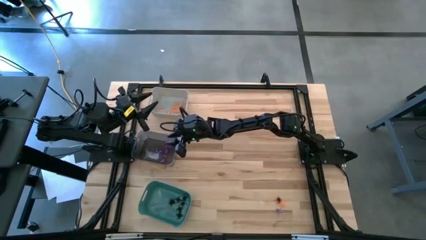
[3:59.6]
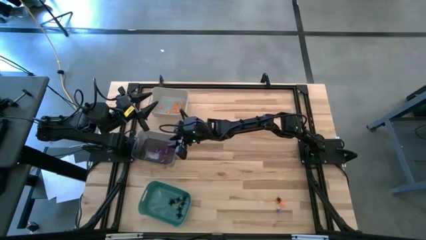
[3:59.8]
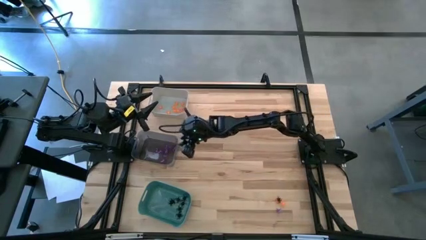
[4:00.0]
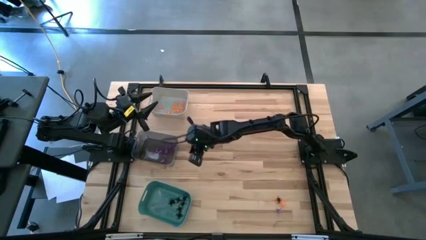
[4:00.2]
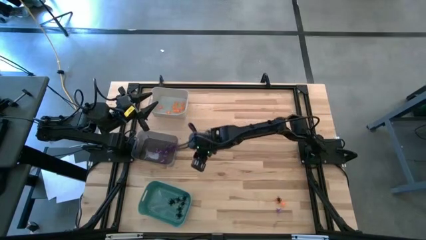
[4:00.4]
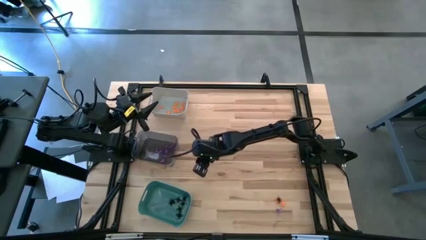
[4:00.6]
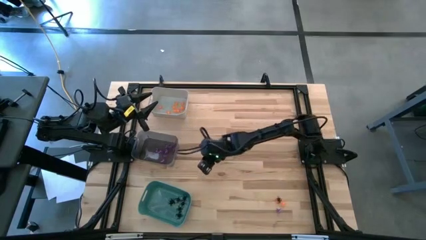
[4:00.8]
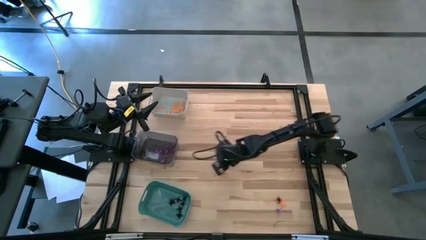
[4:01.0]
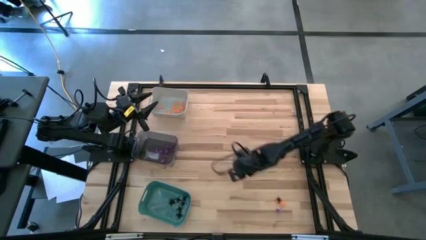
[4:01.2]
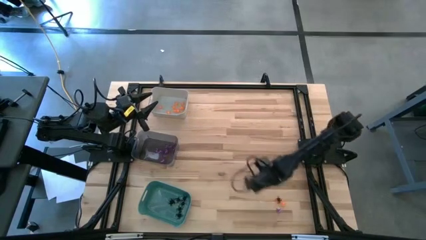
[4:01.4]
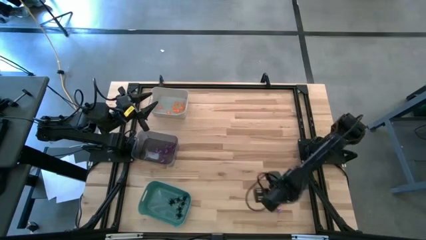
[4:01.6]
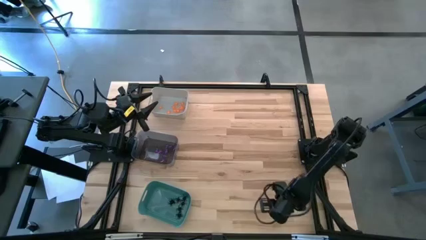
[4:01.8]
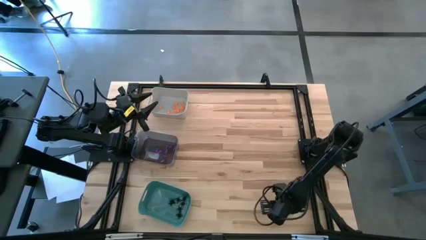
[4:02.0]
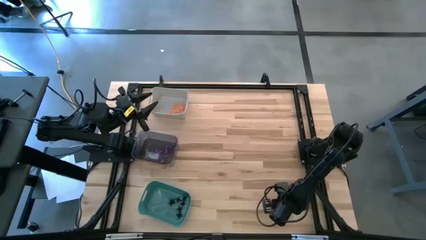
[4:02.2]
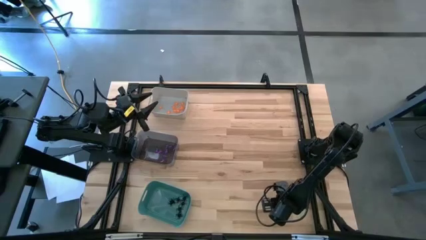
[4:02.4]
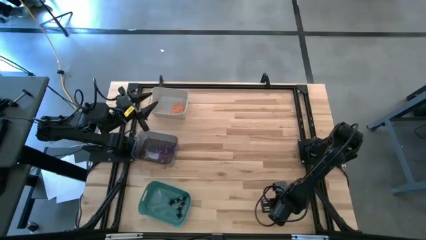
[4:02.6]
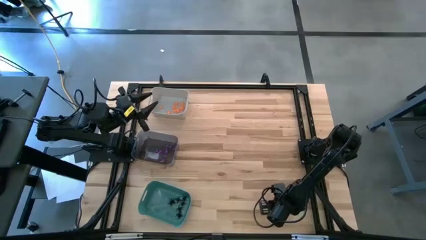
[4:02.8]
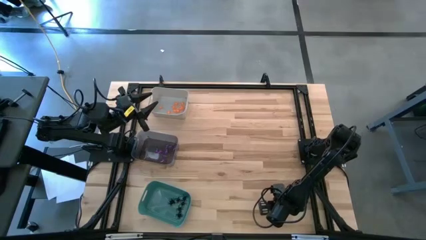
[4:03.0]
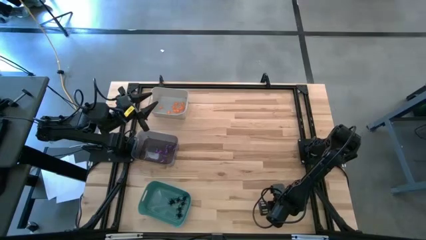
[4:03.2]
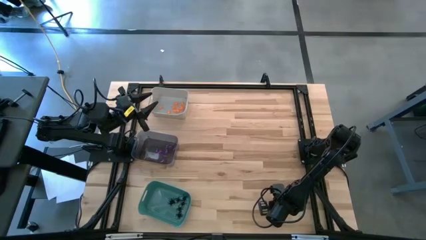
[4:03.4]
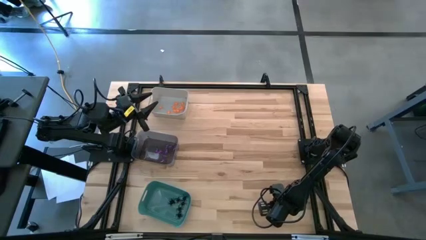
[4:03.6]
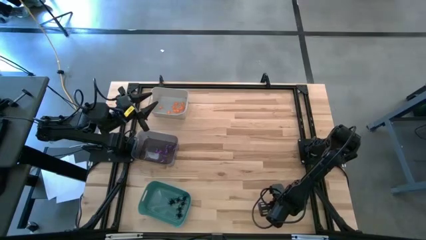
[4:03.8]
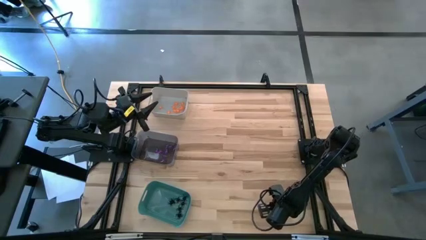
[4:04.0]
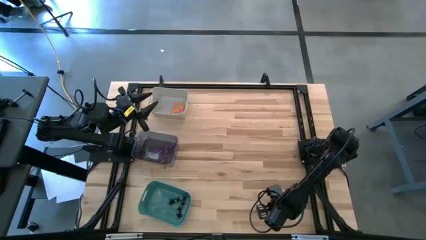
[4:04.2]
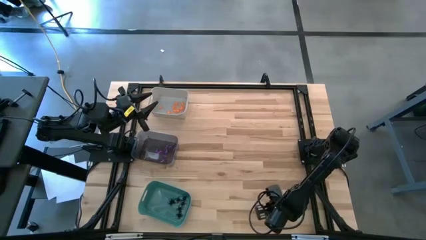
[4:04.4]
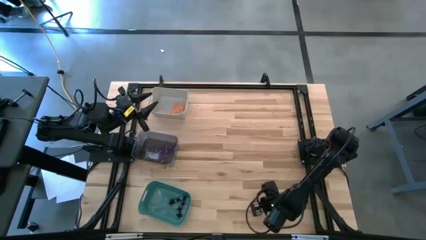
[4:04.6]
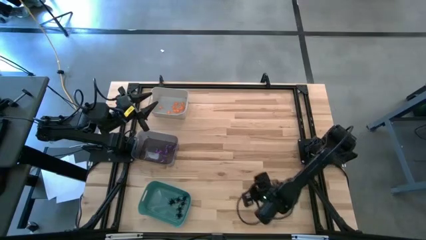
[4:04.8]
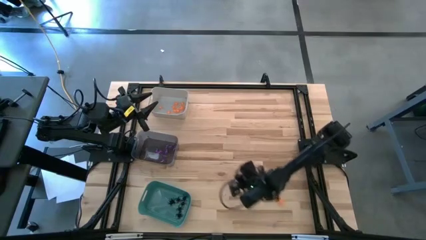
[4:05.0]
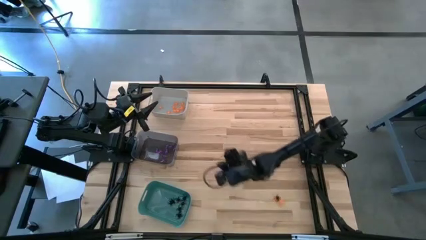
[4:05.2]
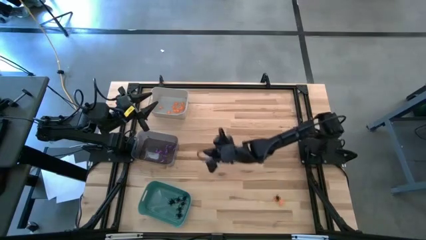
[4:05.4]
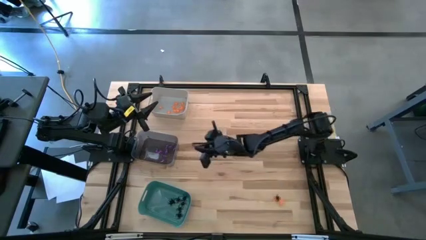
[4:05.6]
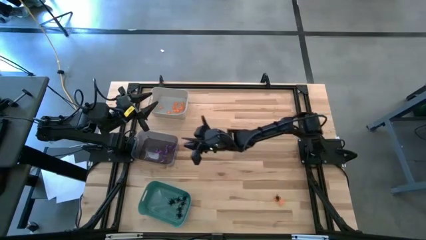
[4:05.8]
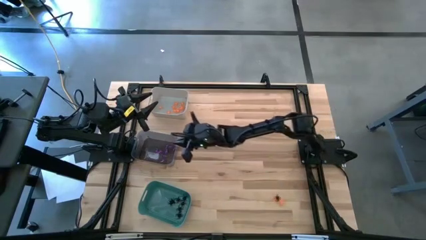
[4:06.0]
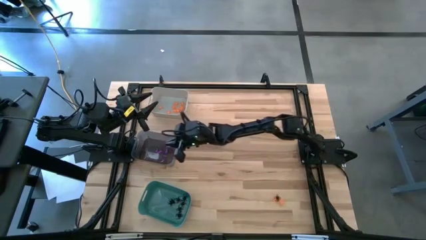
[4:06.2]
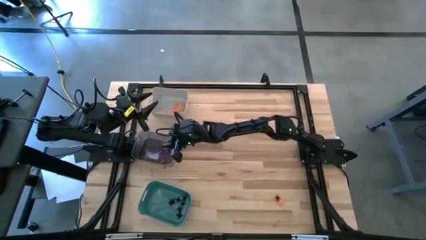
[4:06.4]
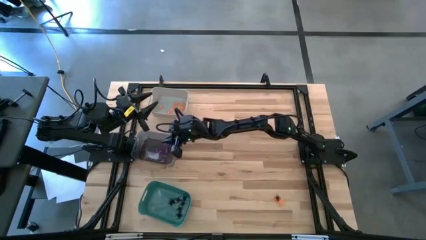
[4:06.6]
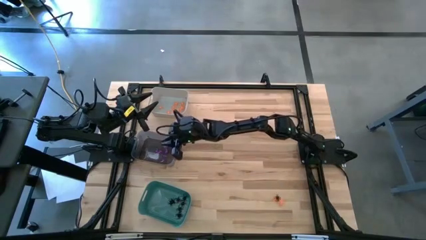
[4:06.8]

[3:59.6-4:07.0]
Task: Sort Halloween decoration
Put the violet witch hat into the black bin

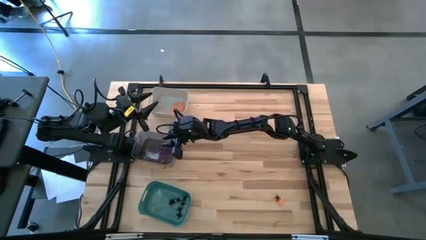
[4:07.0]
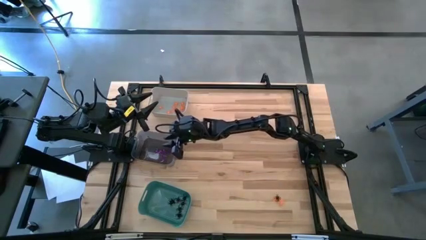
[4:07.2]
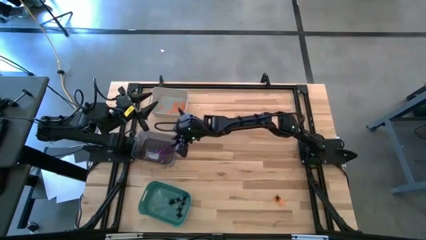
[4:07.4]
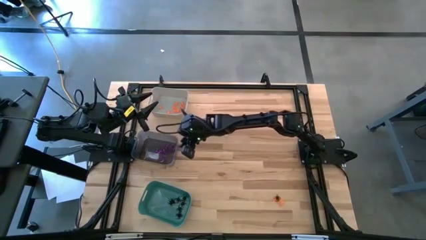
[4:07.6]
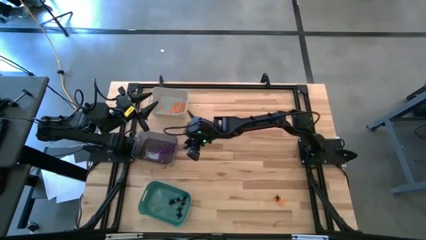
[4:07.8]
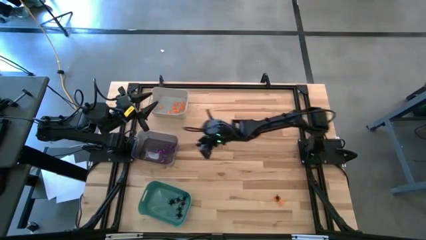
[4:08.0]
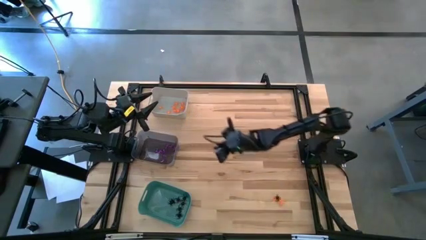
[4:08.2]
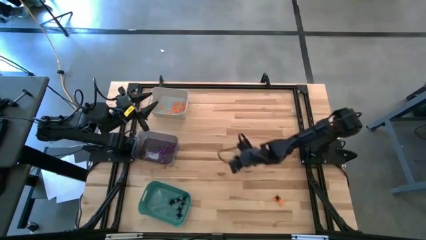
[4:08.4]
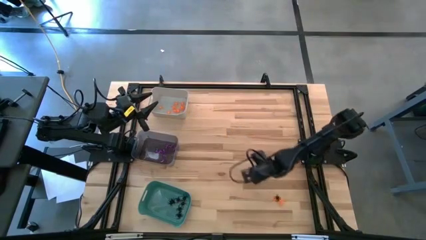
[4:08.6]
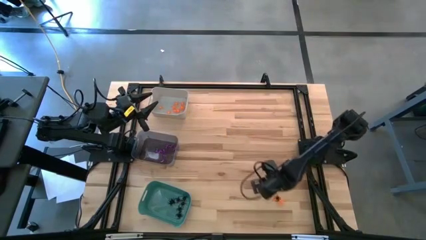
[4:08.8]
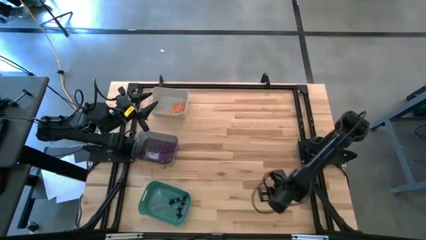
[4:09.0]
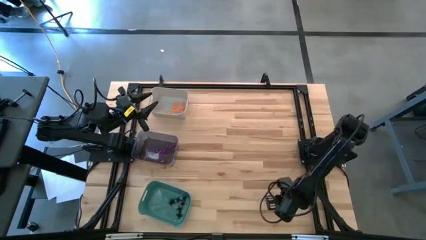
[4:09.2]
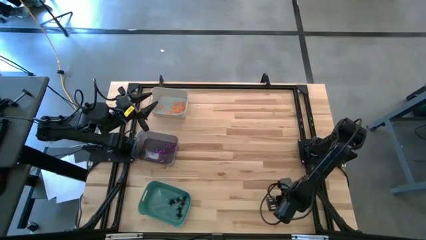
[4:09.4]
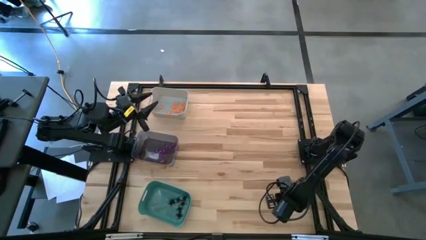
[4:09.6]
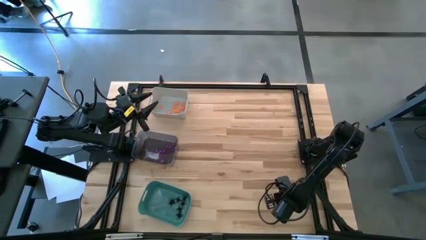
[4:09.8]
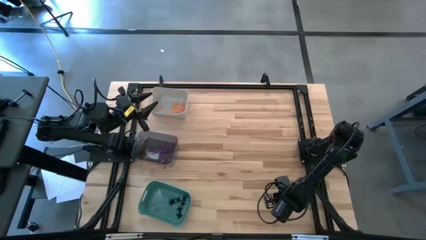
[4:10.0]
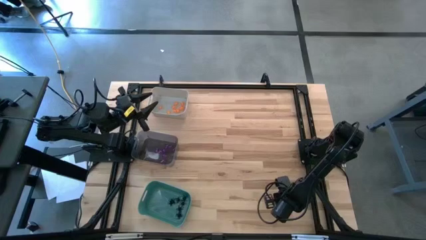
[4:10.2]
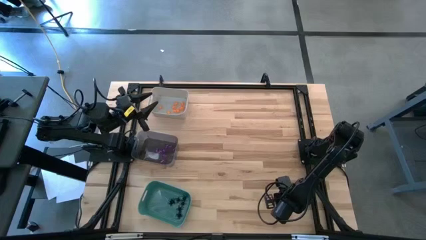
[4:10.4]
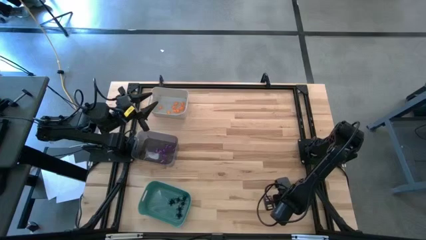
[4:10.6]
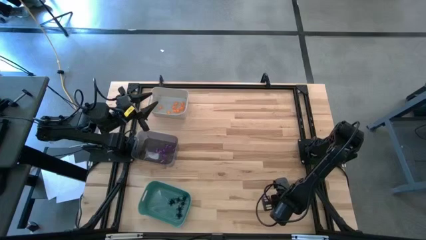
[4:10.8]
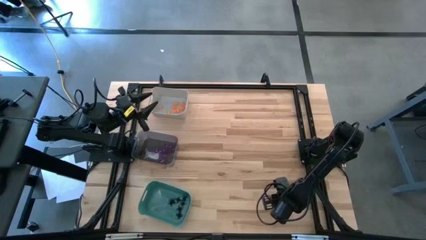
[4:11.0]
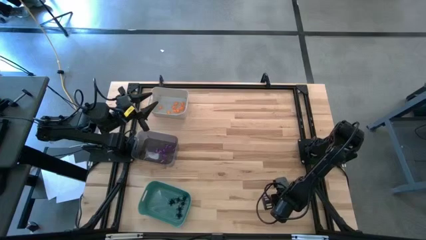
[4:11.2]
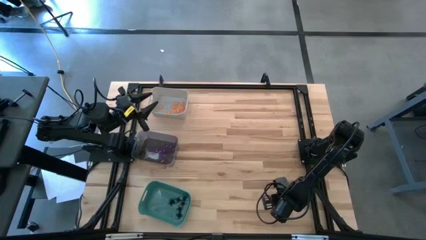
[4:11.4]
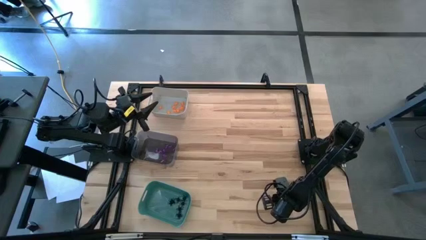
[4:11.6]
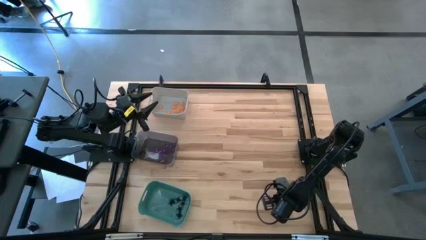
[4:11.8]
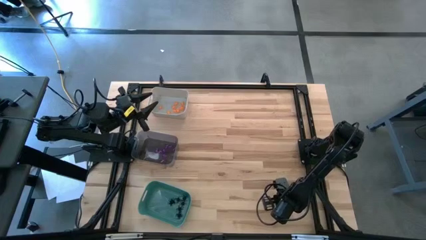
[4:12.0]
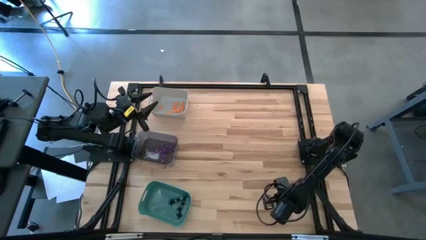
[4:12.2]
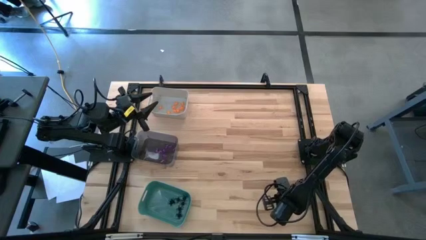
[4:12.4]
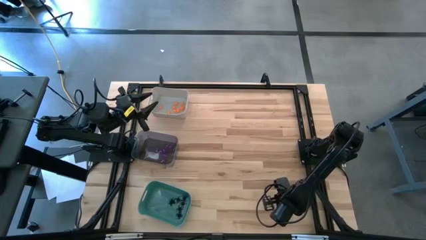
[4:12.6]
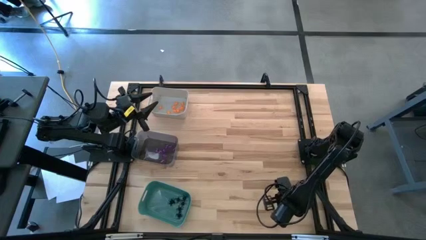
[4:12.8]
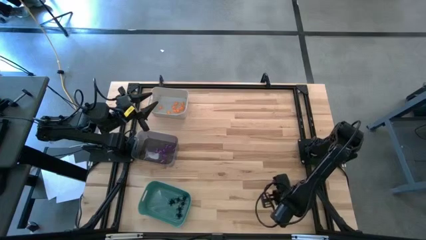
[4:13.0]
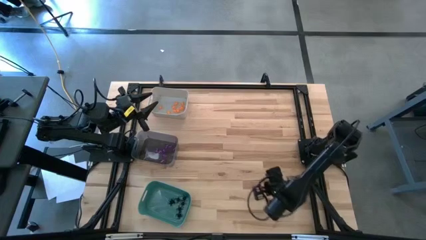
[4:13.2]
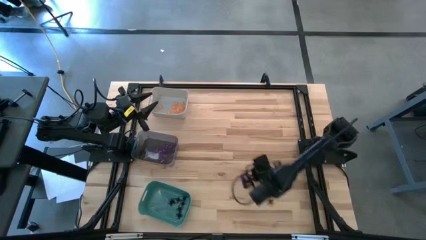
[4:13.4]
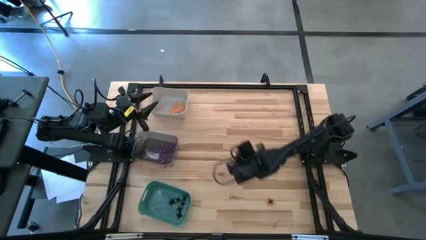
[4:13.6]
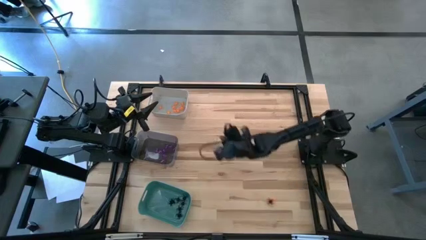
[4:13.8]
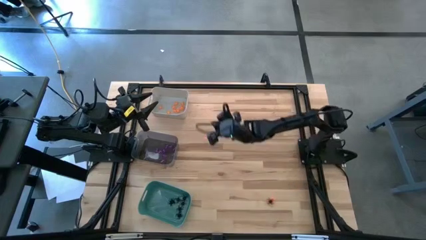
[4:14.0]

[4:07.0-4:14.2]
Put the right orange spider into the gray bin
